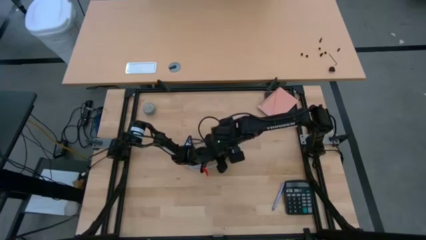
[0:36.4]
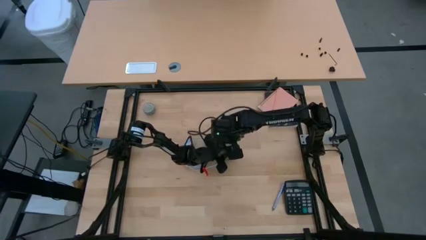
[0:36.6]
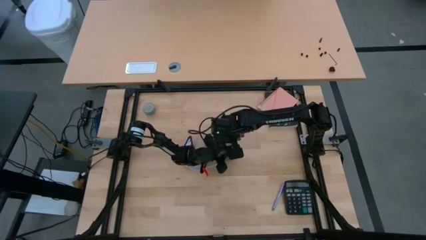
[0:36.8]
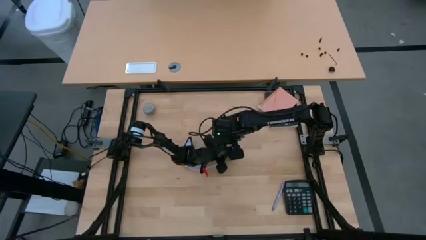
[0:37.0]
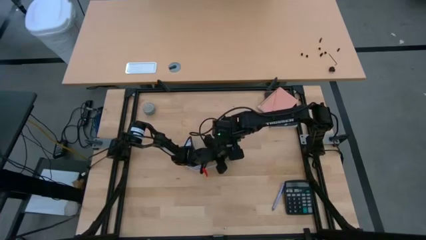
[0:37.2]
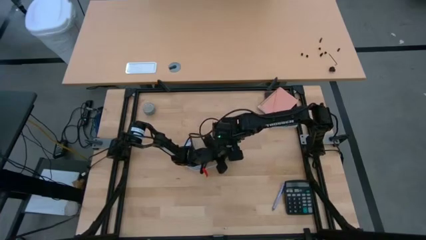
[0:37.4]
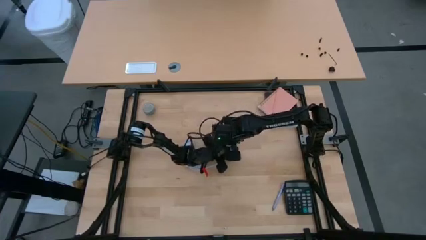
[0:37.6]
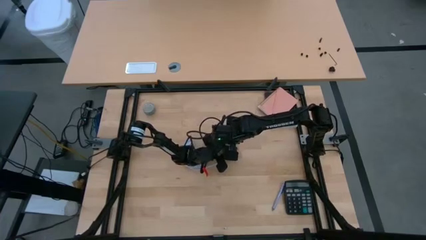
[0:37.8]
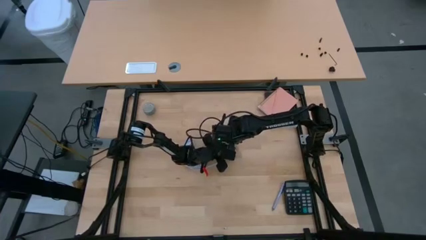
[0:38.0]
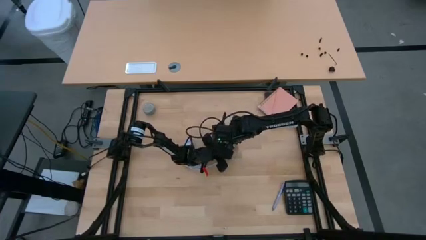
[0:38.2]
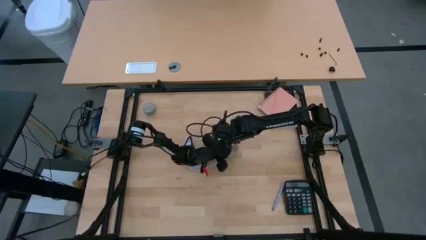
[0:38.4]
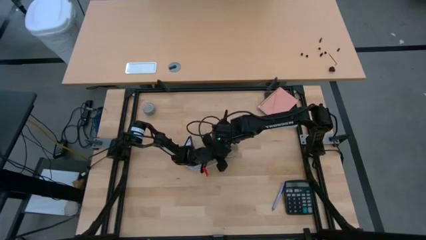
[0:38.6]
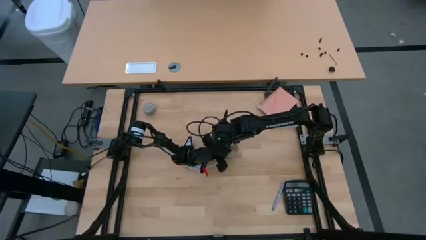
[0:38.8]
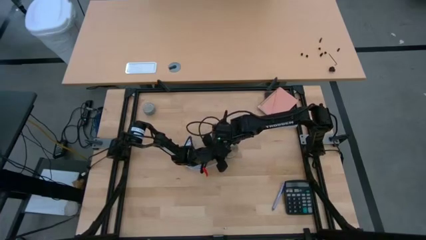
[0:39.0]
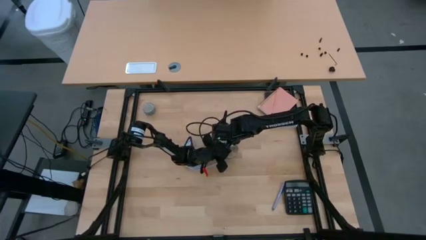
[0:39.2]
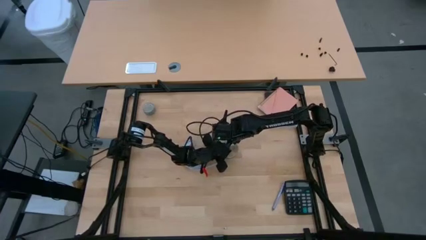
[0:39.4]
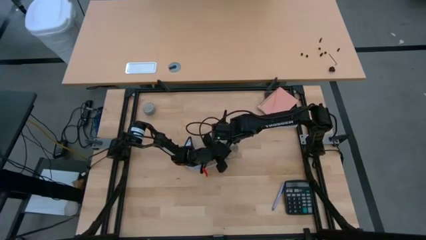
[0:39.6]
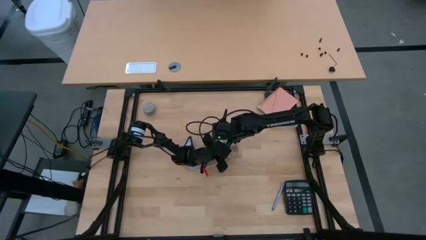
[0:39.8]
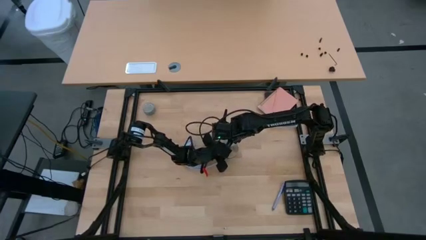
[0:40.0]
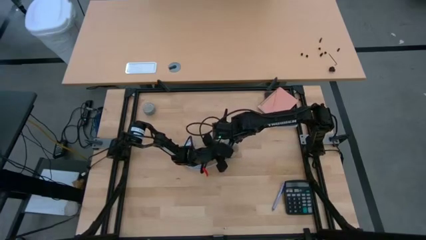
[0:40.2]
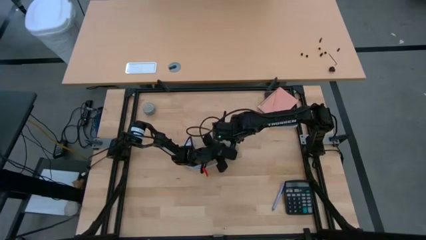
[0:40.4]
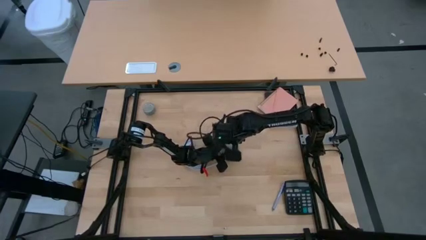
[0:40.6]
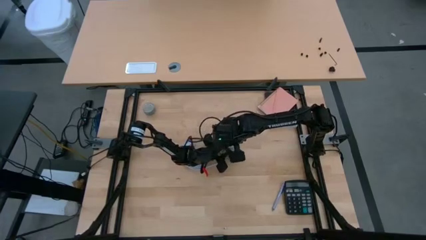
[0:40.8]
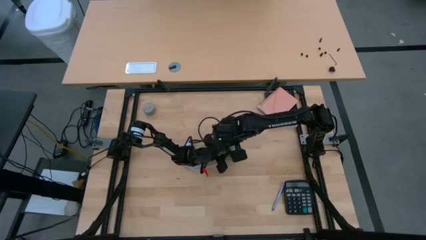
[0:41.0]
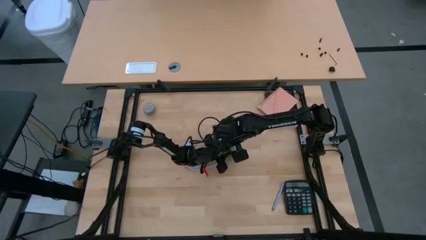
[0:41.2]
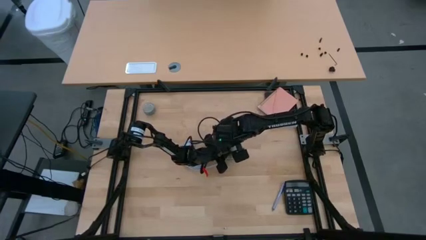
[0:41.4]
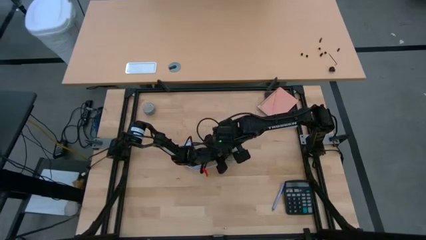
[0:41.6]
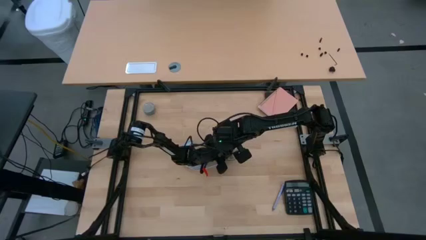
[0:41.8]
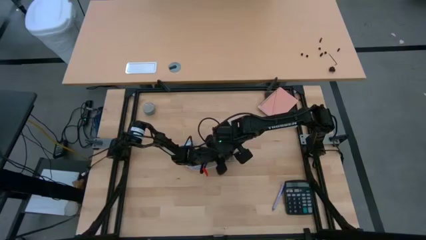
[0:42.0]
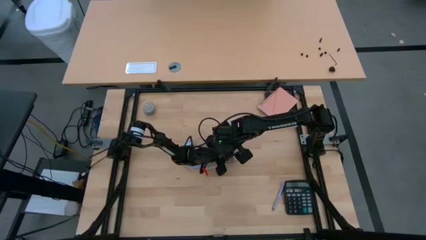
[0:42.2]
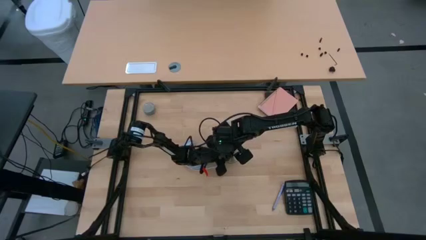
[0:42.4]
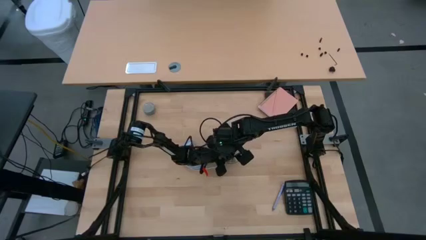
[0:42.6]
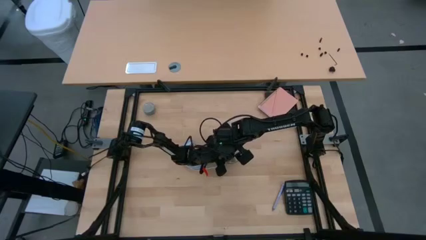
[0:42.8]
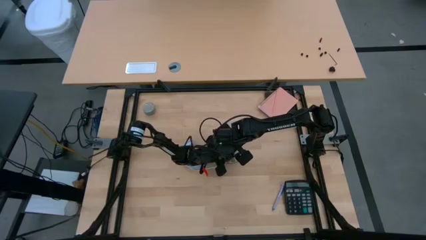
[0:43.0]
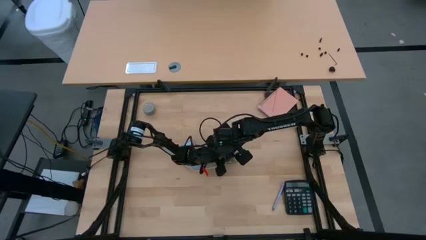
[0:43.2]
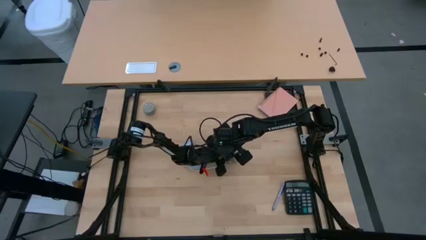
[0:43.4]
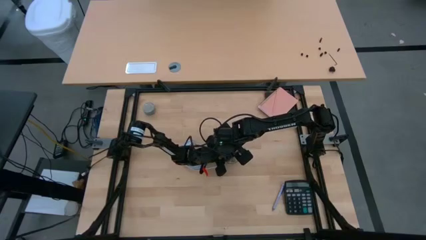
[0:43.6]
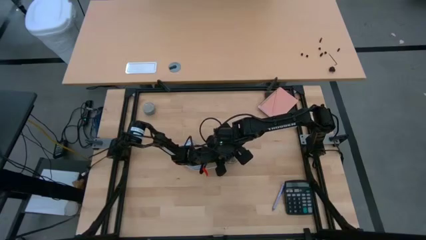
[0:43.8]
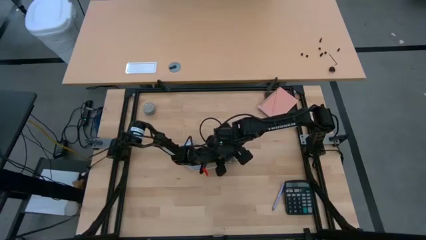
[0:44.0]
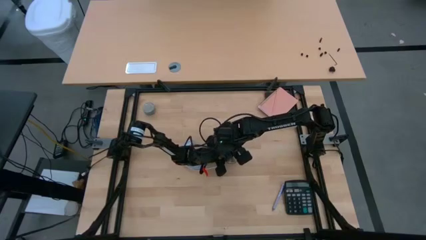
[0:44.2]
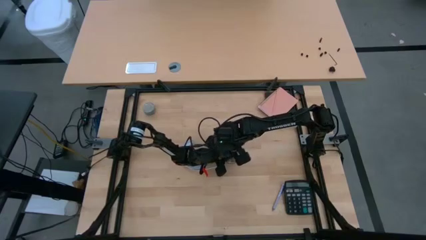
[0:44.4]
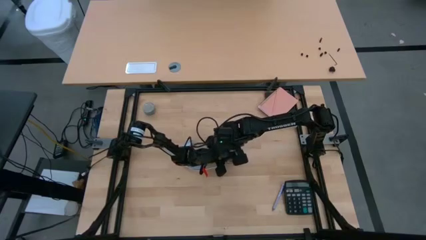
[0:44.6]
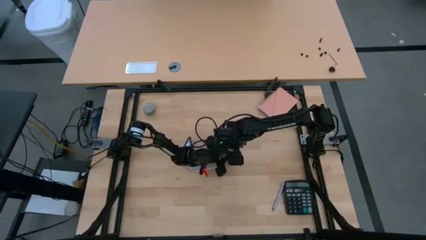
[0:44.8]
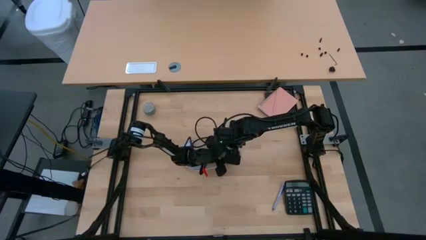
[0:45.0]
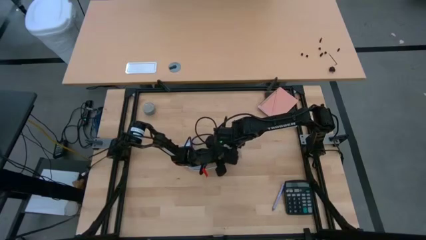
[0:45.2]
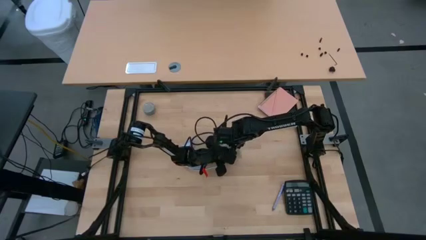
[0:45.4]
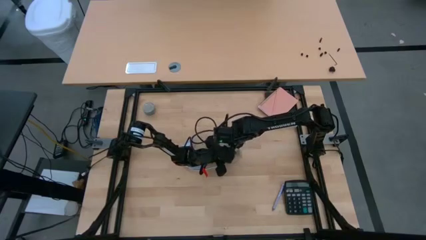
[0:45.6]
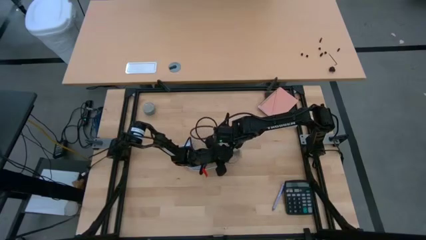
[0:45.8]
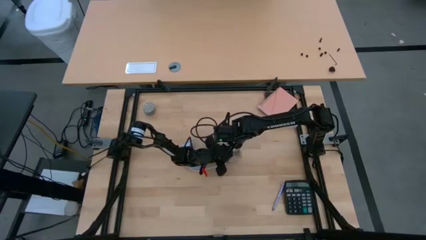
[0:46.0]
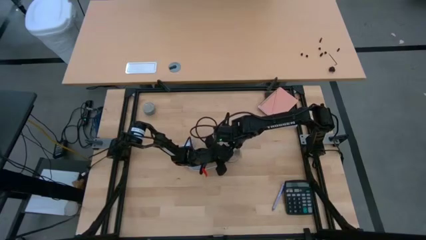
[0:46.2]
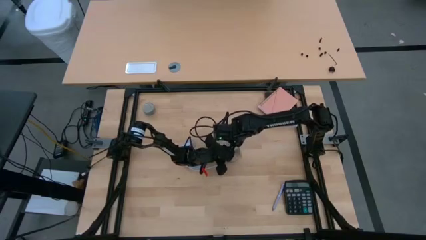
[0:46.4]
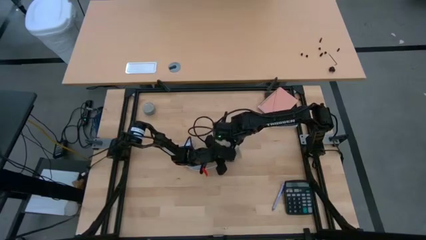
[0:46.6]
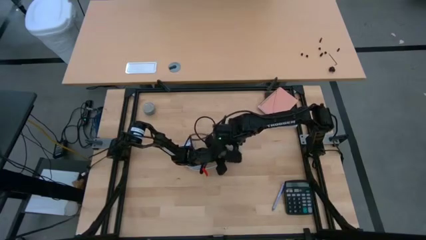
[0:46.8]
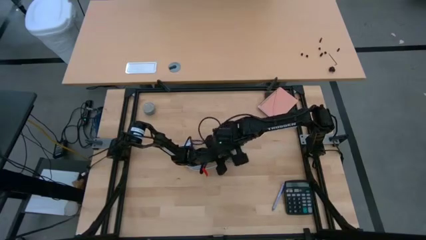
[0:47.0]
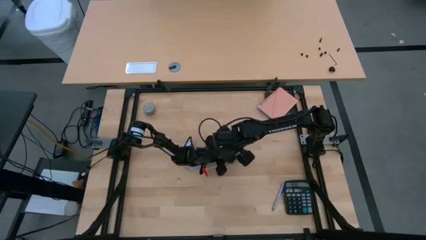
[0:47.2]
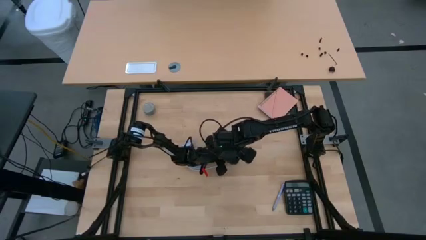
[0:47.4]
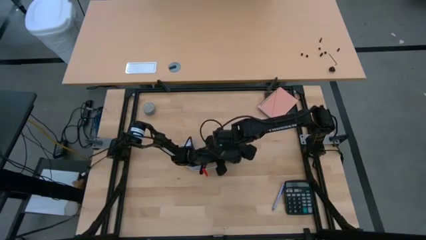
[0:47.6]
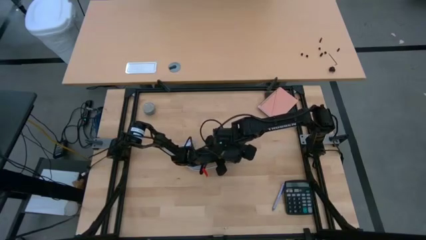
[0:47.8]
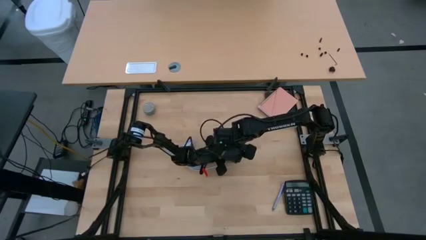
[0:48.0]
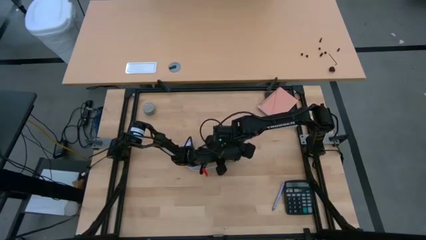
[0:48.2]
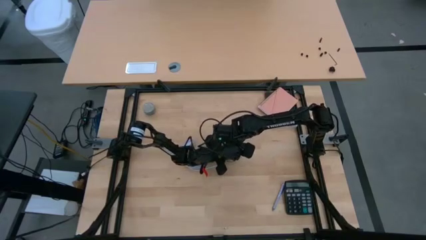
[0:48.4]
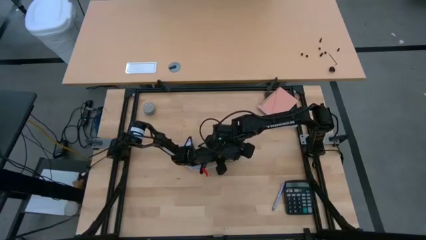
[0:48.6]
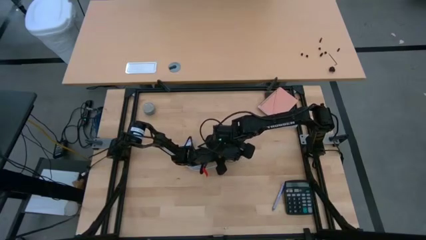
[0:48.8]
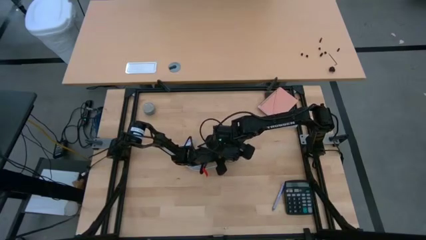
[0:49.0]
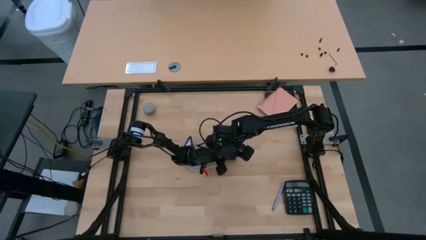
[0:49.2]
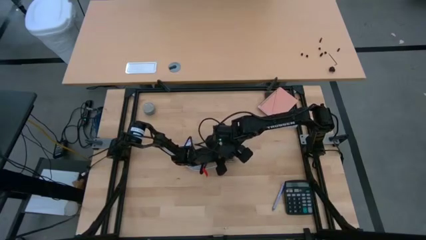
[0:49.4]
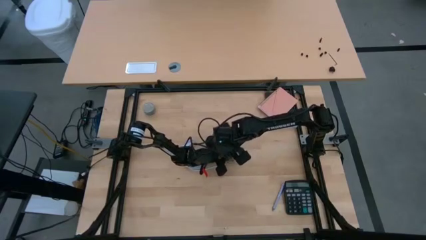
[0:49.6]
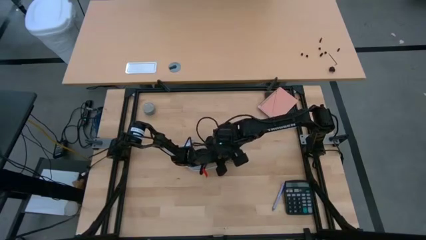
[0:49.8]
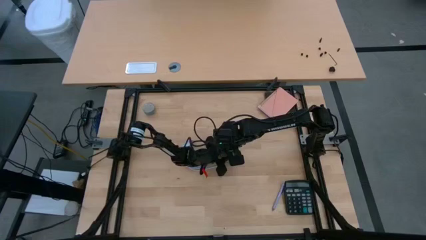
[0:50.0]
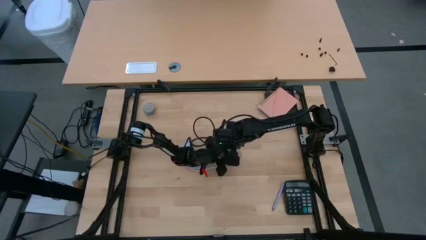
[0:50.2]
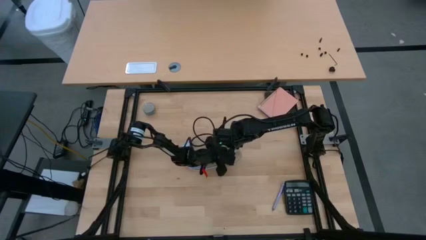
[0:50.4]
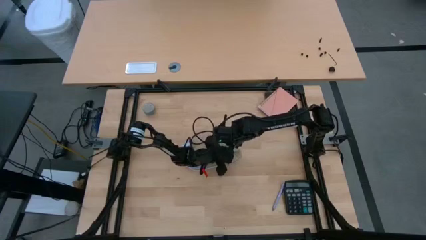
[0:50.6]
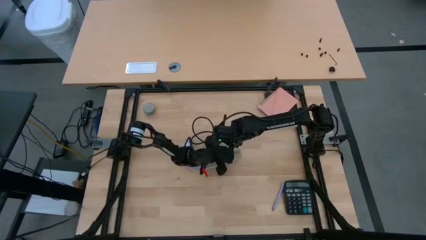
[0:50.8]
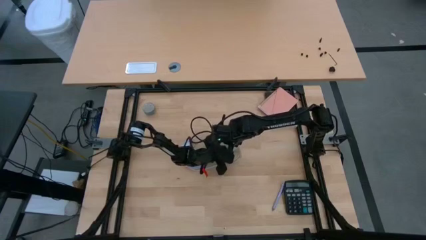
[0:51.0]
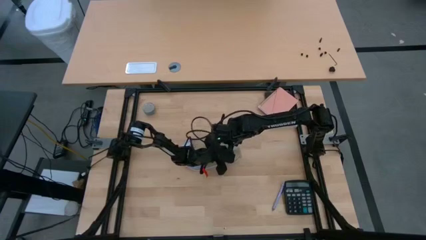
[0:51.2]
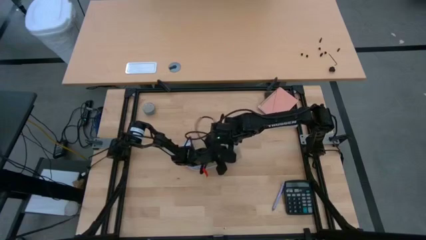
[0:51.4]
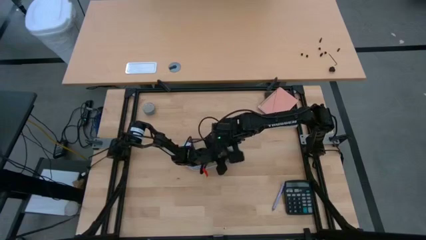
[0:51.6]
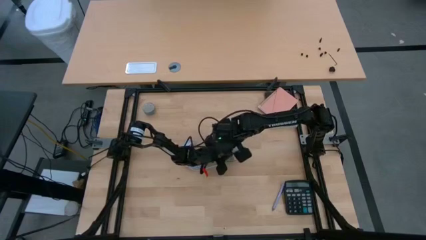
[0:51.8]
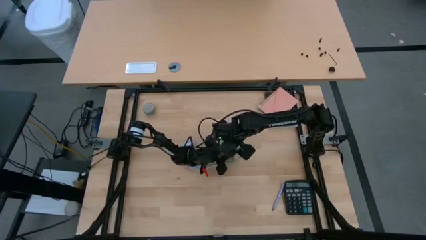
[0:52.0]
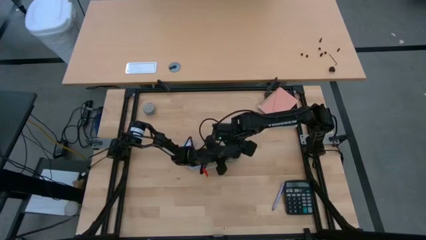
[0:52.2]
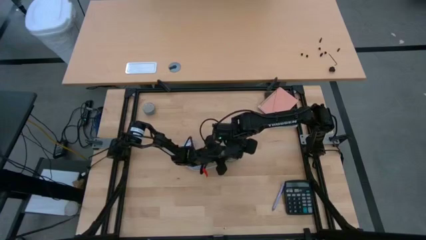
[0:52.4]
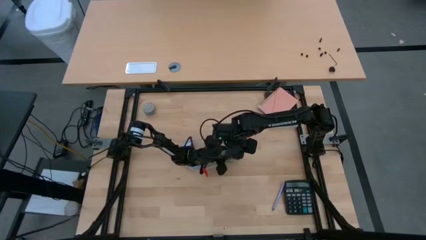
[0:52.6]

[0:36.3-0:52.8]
Task: Screw lightbulb
Insert the lightbulb into the lamp
